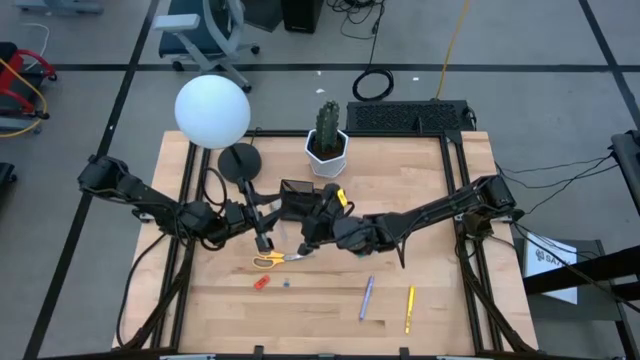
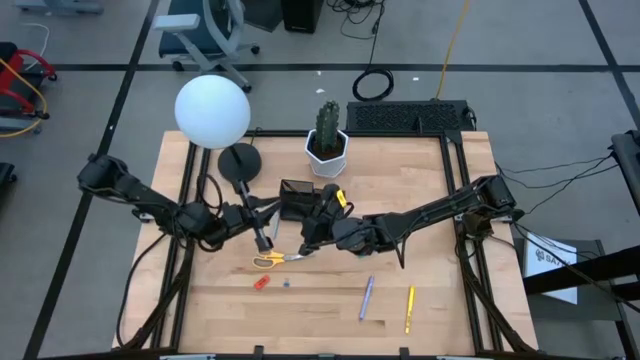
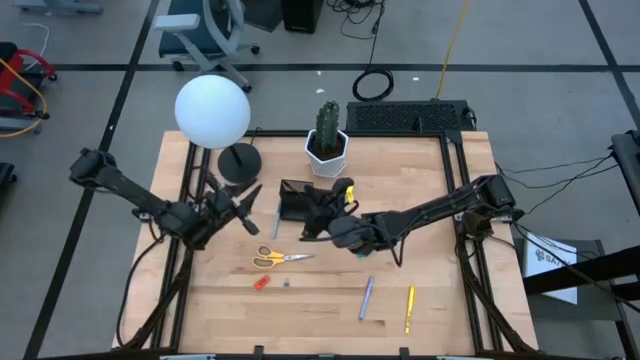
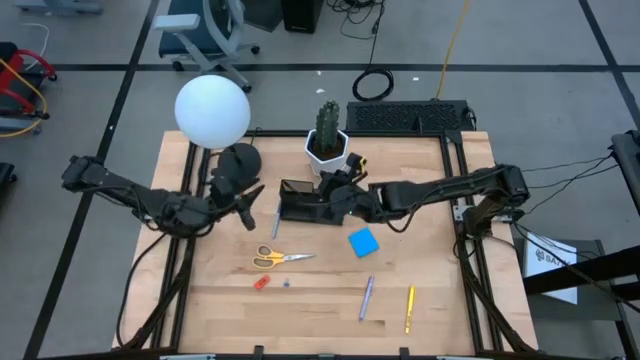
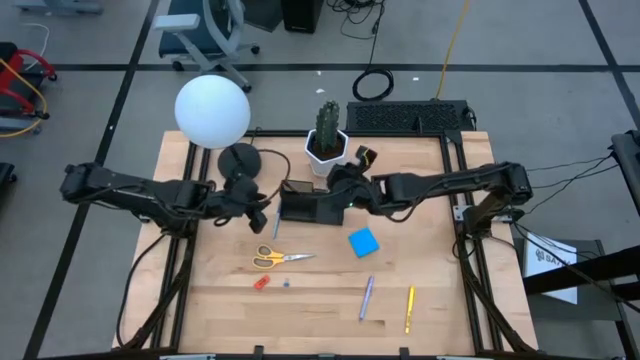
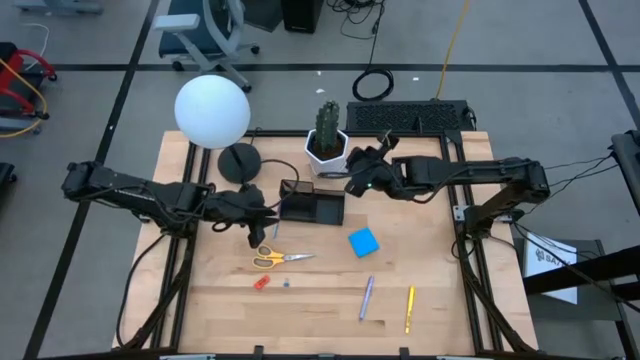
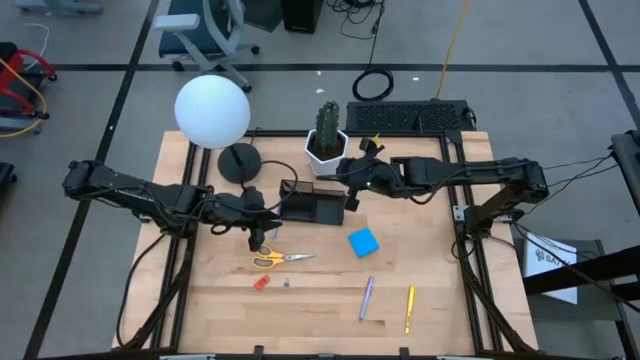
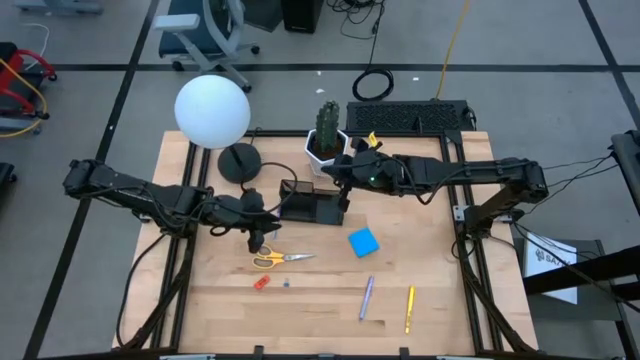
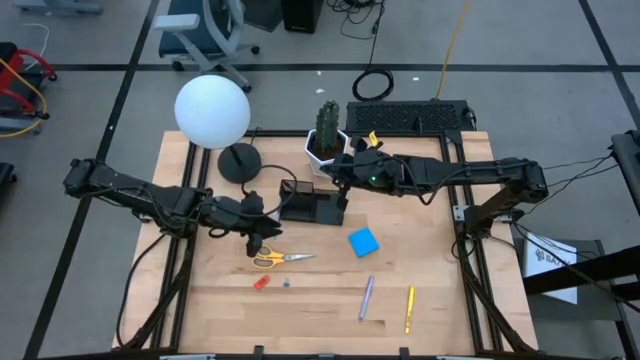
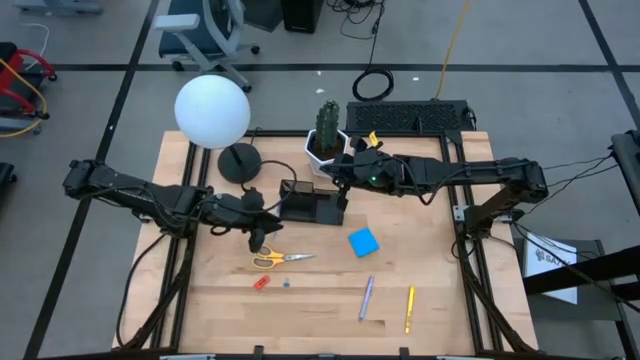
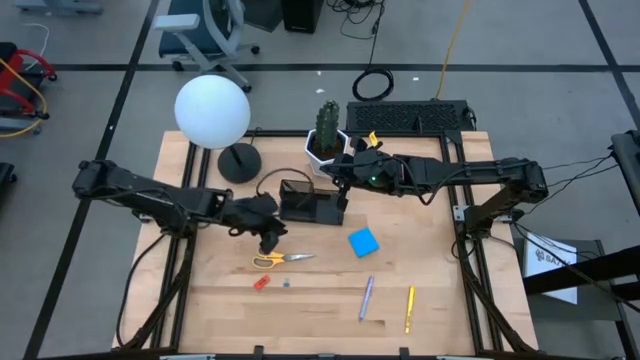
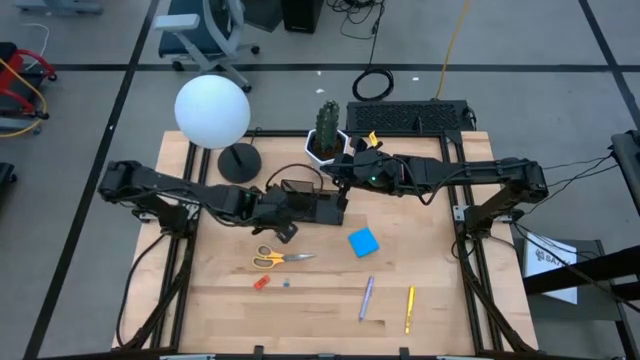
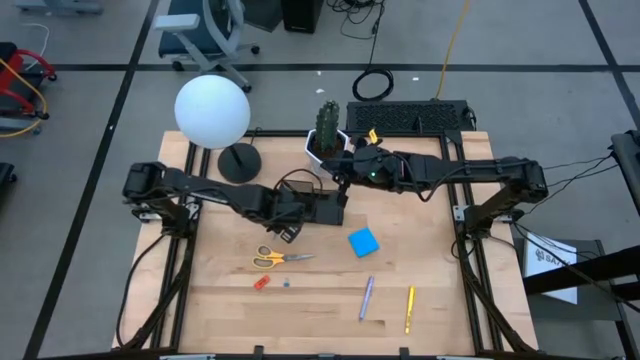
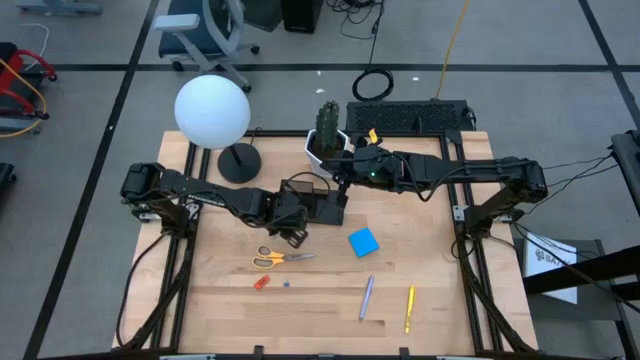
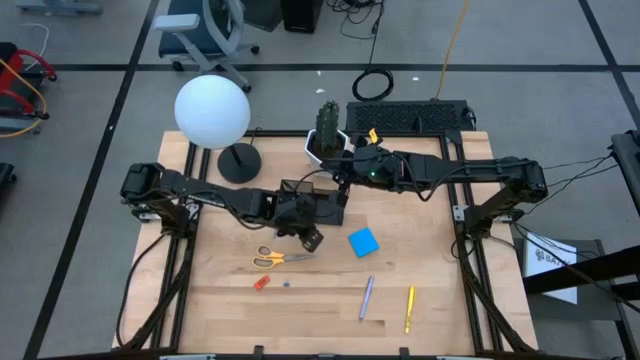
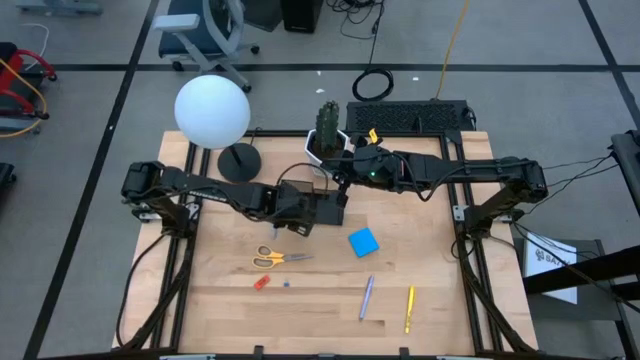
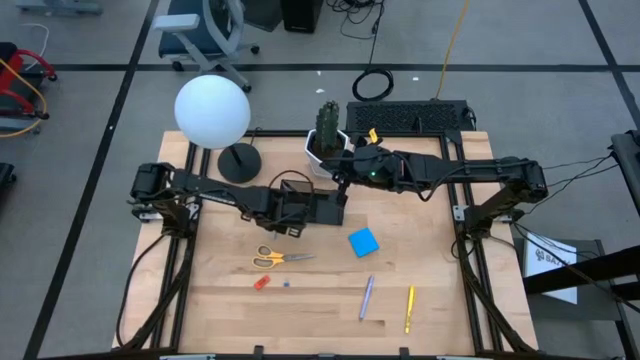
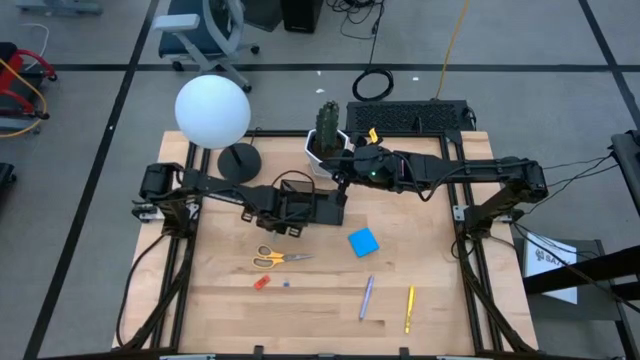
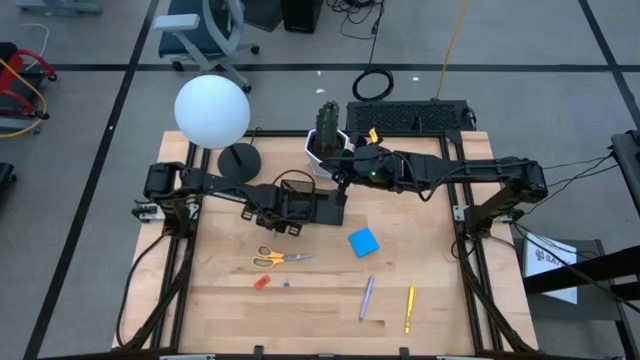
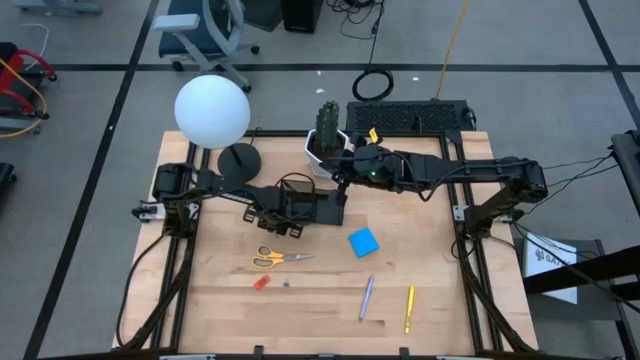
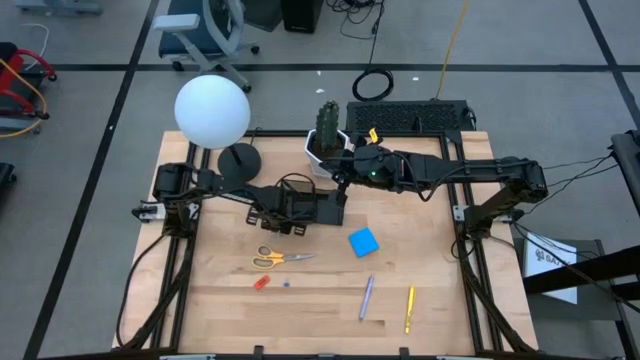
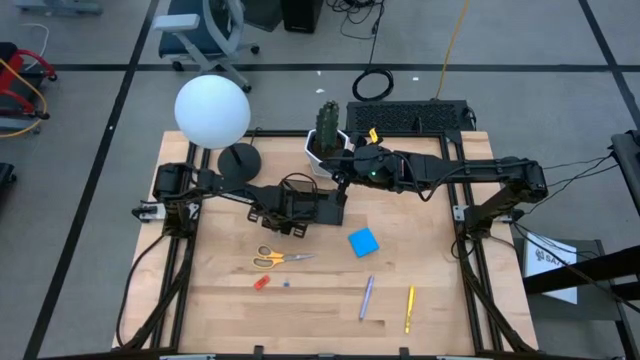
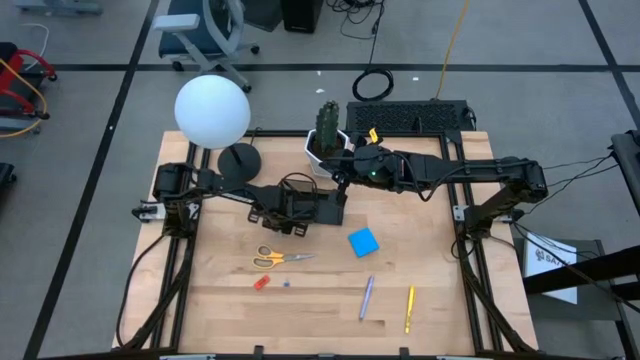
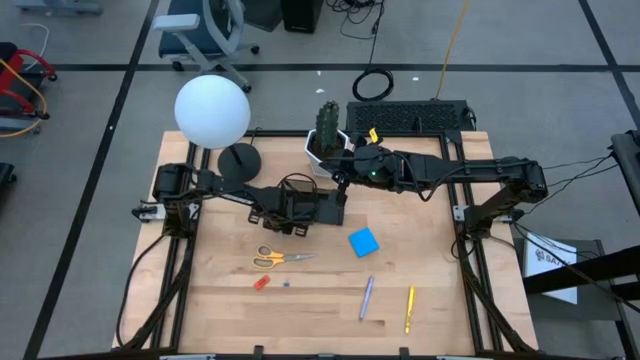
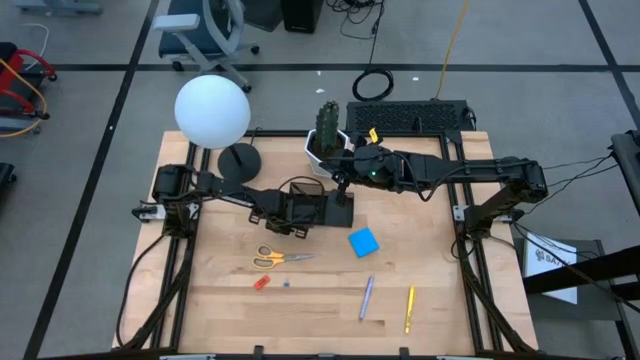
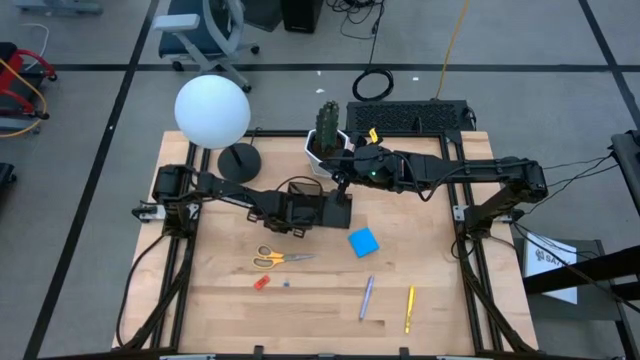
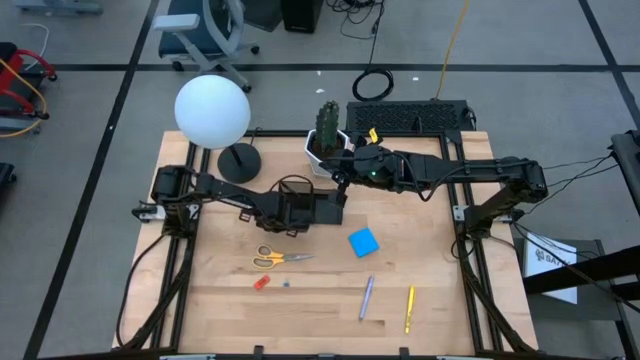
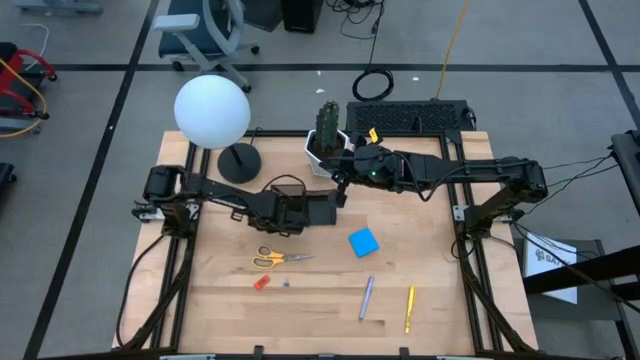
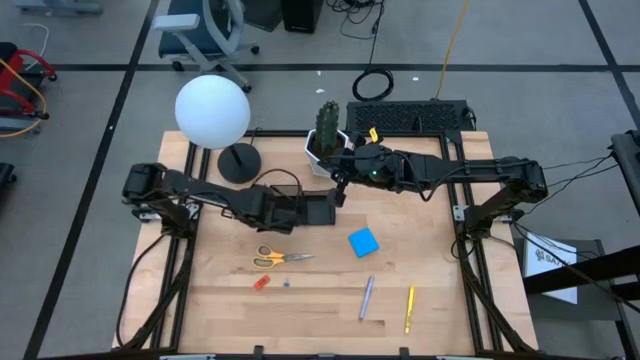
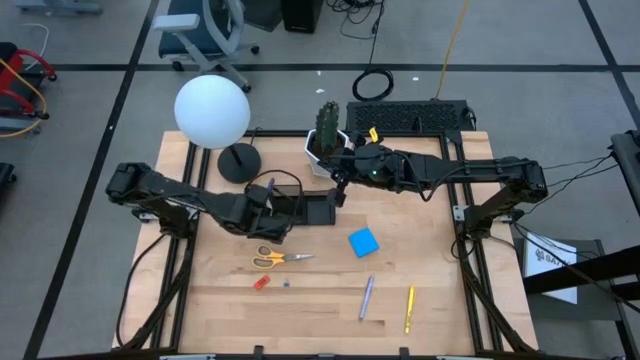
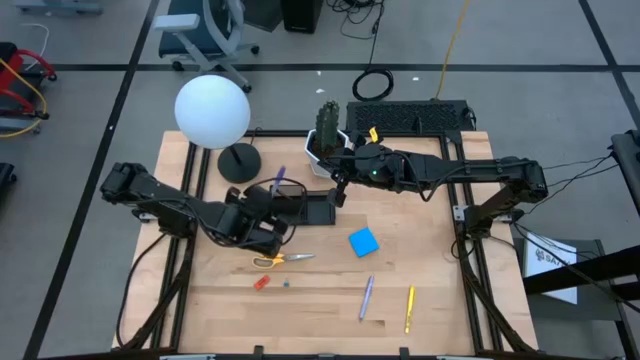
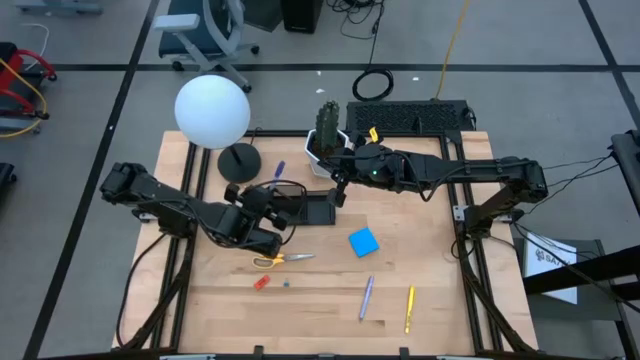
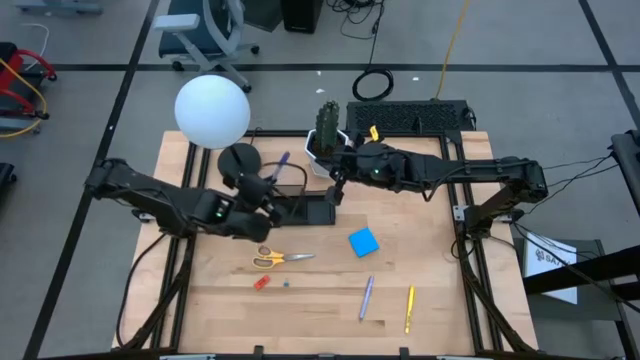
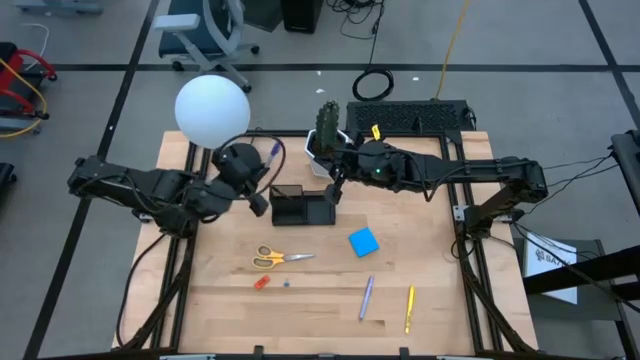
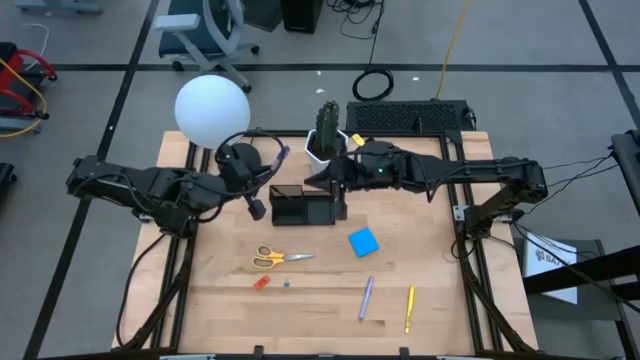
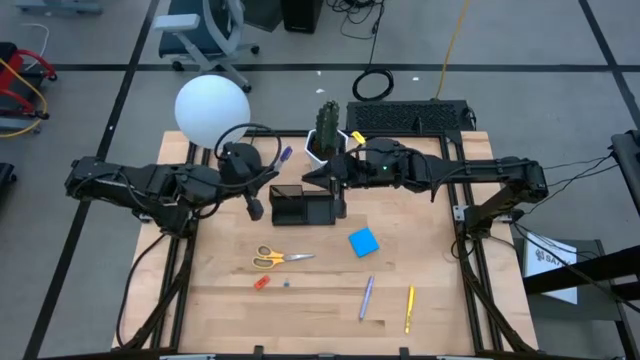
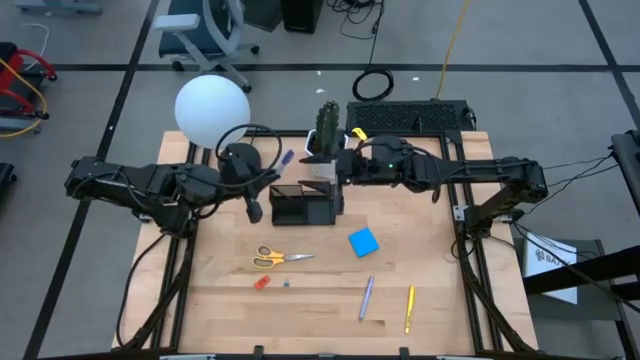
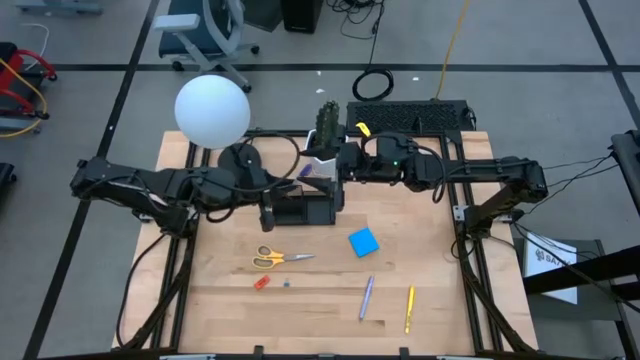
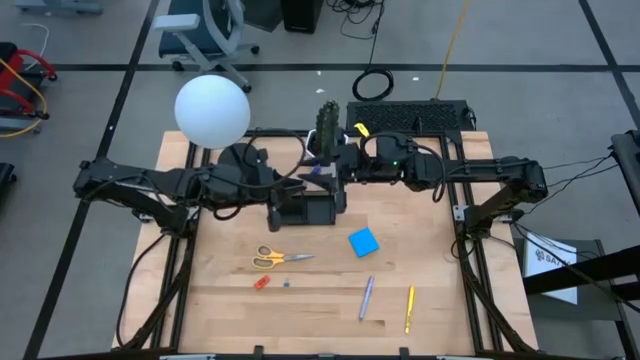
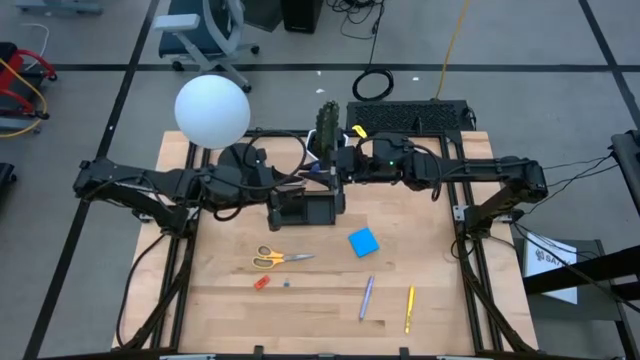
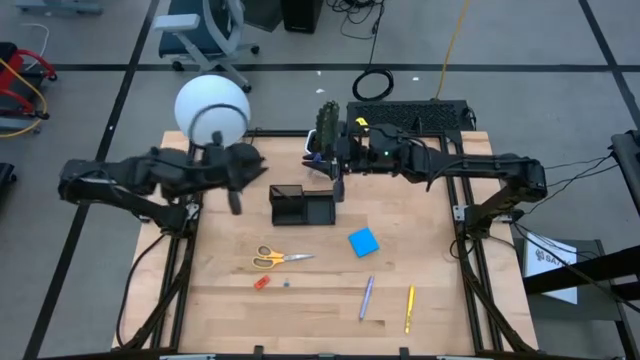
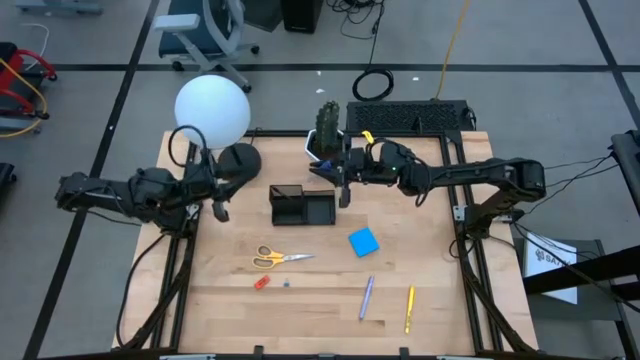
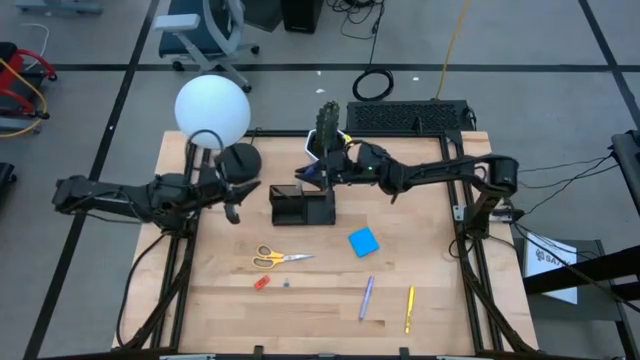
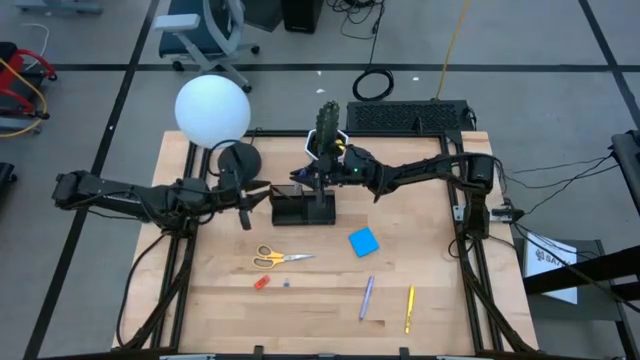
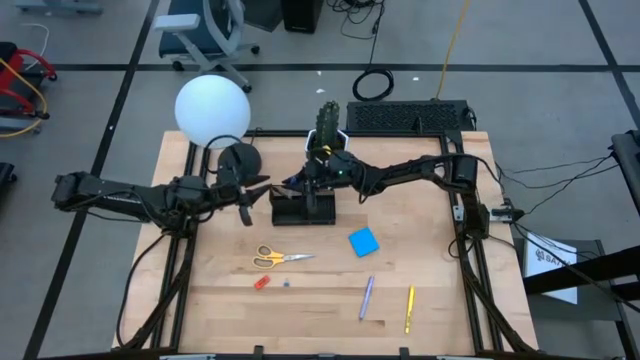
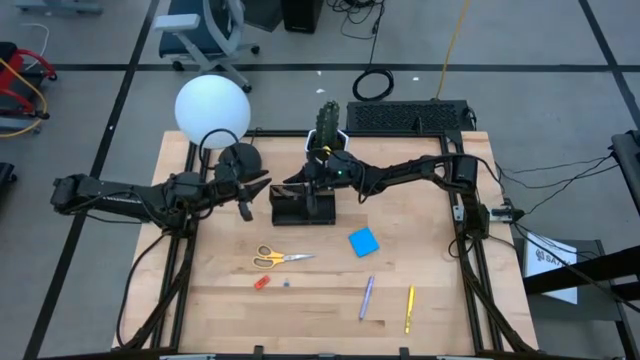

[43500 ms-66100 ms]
Task: Pick and place office supplies into organizer
Put the blue pen into the desk organizer
